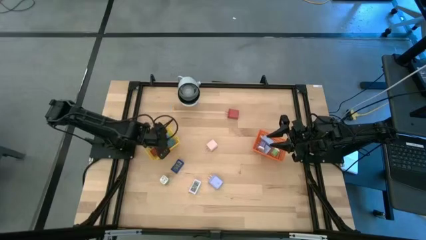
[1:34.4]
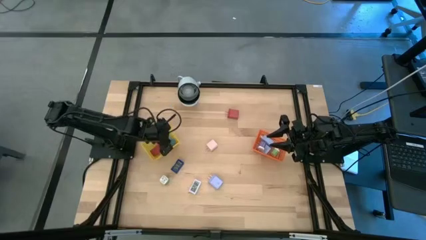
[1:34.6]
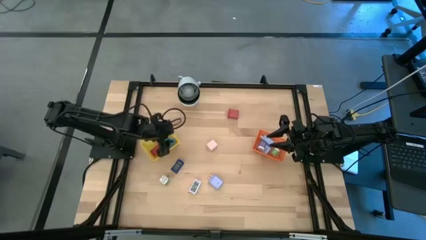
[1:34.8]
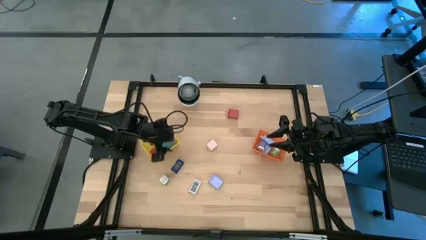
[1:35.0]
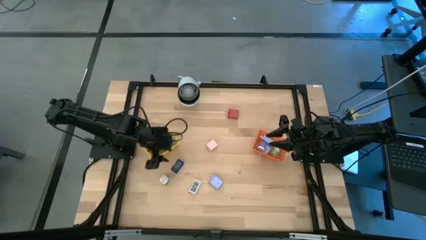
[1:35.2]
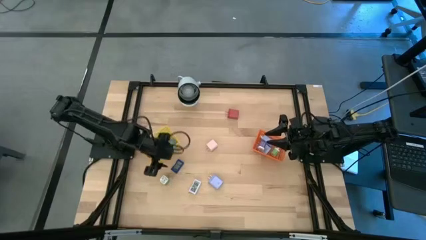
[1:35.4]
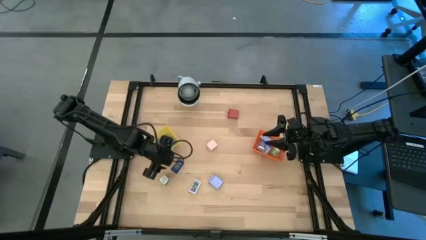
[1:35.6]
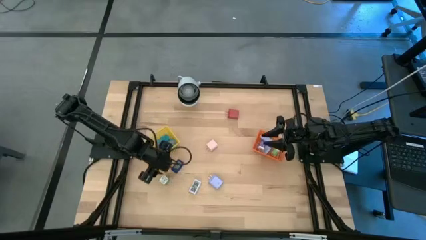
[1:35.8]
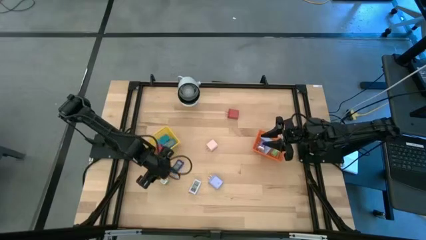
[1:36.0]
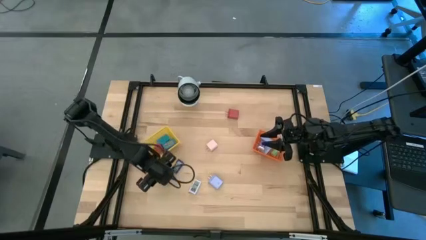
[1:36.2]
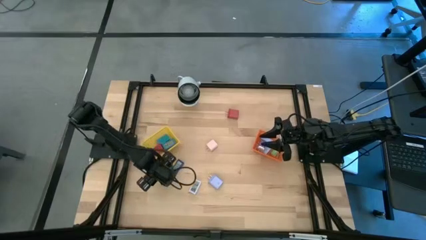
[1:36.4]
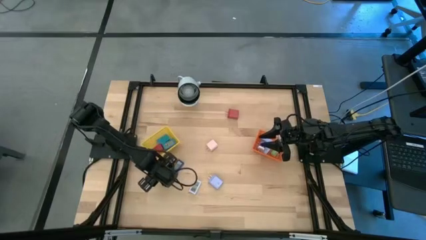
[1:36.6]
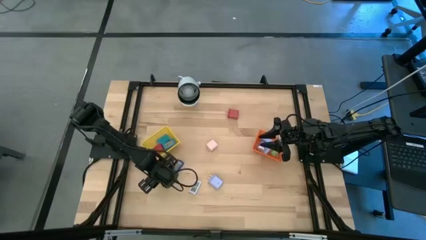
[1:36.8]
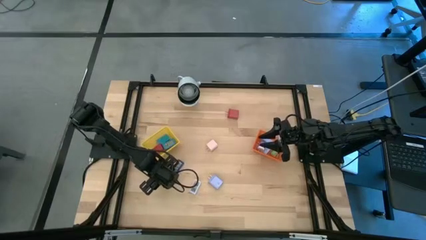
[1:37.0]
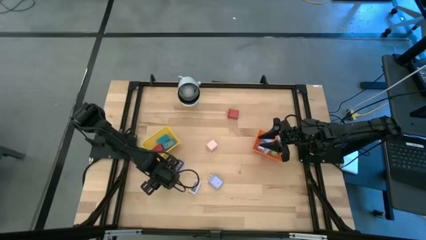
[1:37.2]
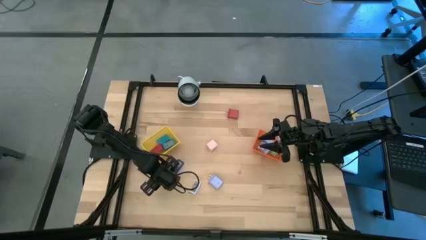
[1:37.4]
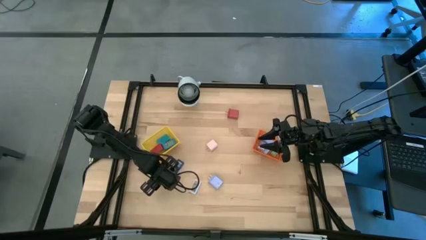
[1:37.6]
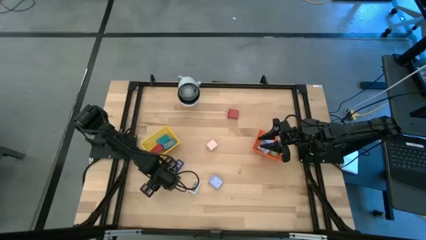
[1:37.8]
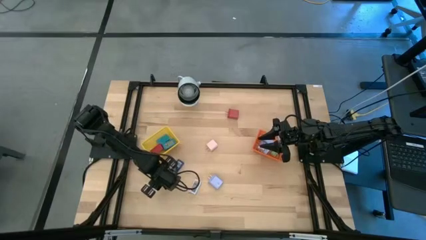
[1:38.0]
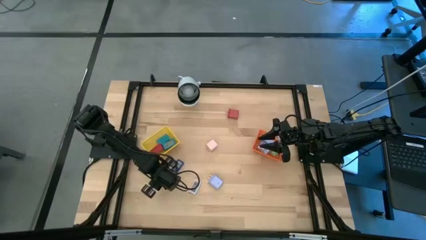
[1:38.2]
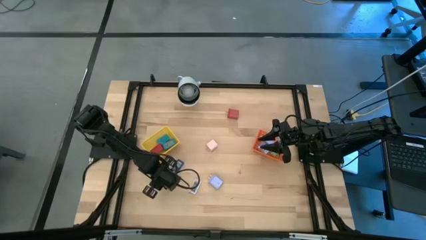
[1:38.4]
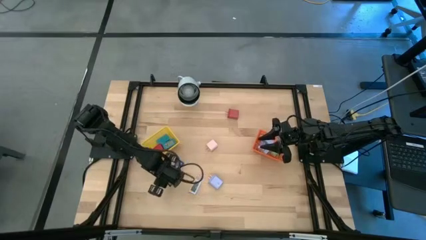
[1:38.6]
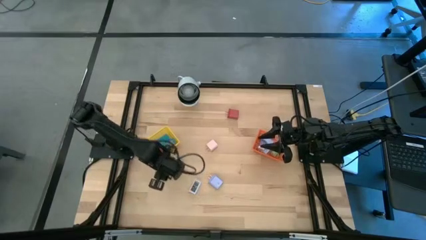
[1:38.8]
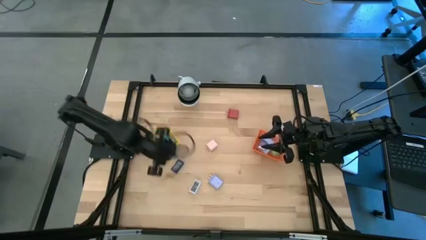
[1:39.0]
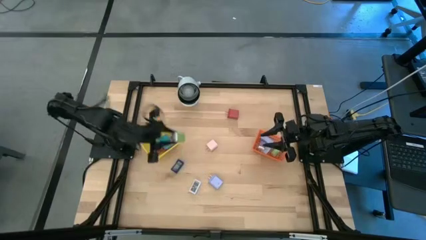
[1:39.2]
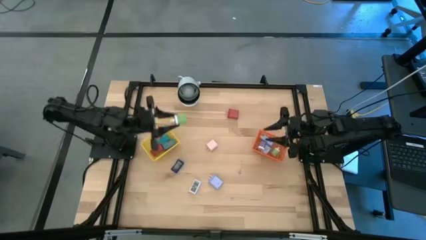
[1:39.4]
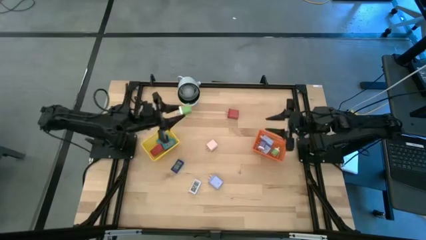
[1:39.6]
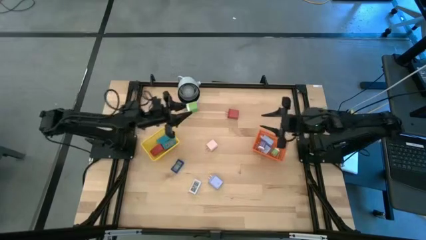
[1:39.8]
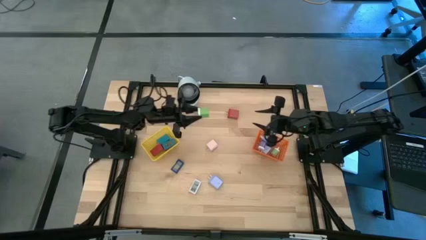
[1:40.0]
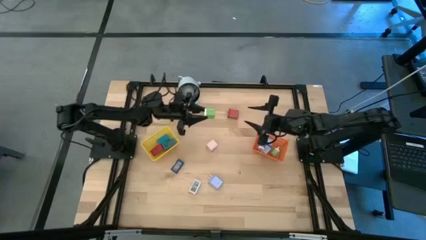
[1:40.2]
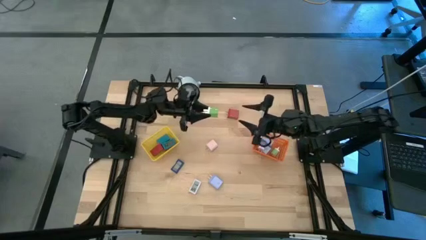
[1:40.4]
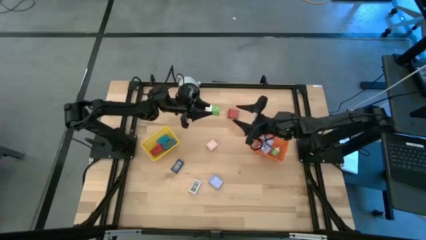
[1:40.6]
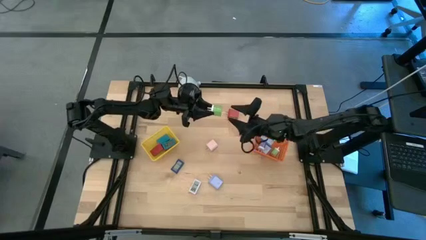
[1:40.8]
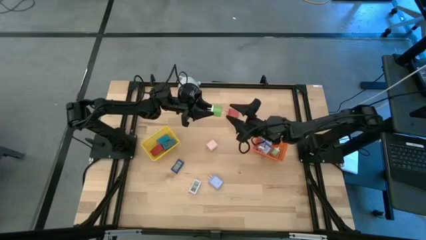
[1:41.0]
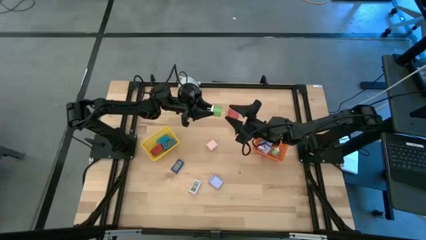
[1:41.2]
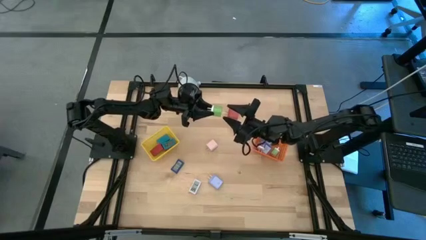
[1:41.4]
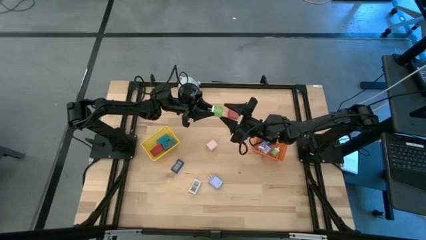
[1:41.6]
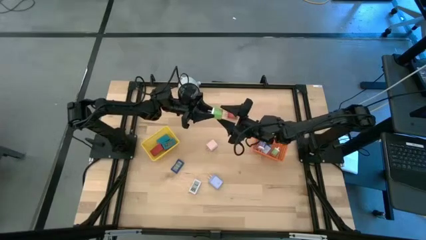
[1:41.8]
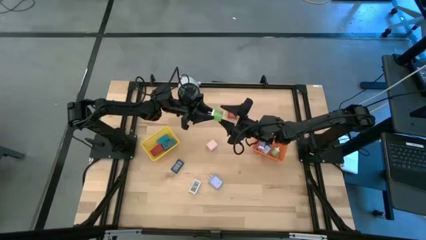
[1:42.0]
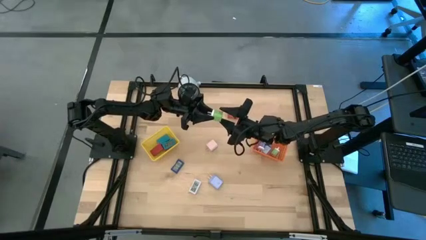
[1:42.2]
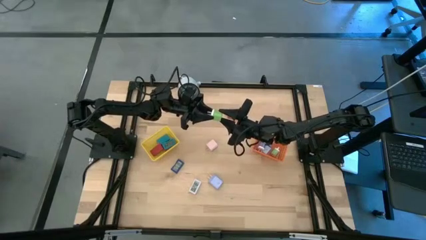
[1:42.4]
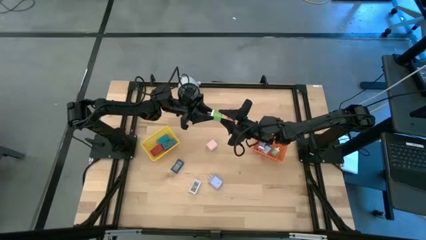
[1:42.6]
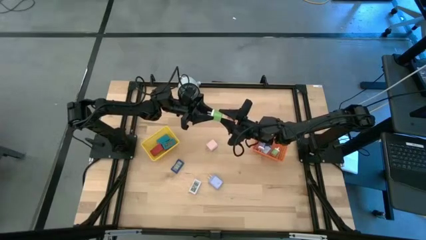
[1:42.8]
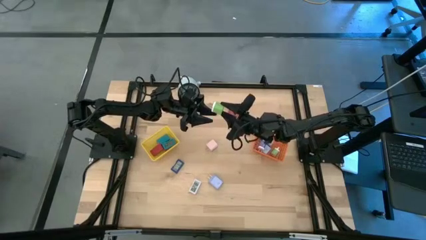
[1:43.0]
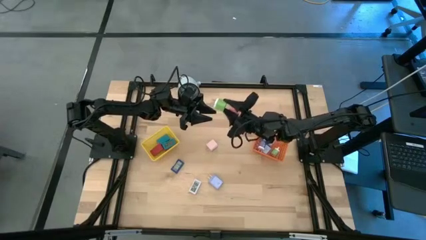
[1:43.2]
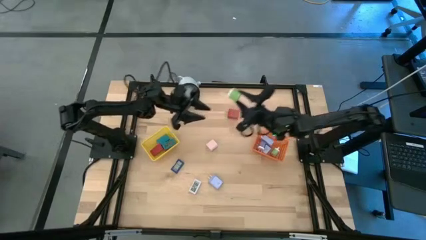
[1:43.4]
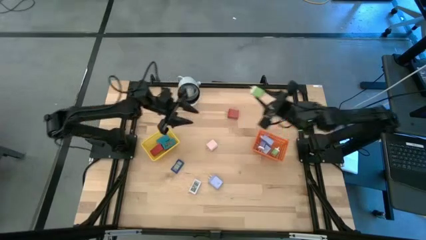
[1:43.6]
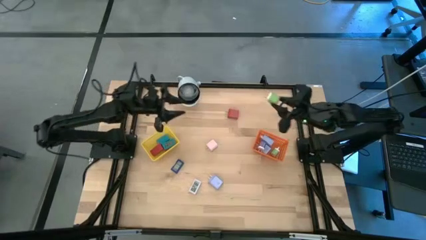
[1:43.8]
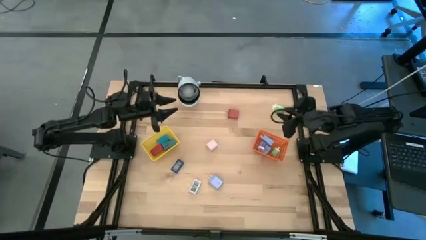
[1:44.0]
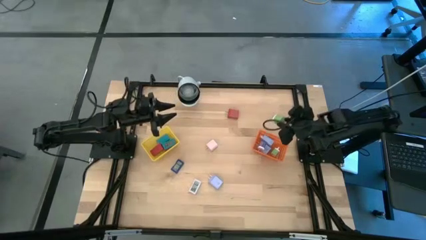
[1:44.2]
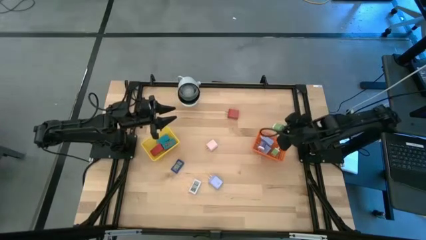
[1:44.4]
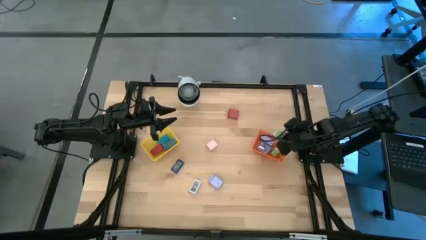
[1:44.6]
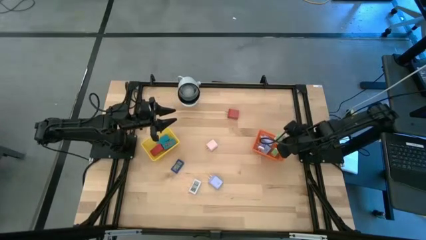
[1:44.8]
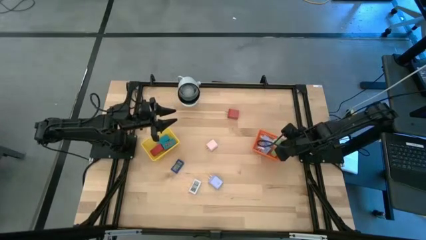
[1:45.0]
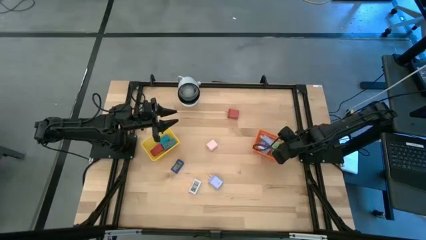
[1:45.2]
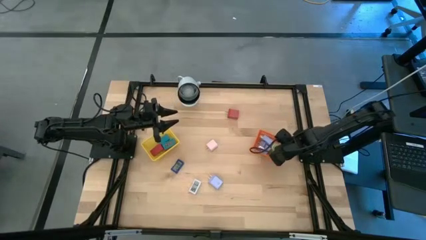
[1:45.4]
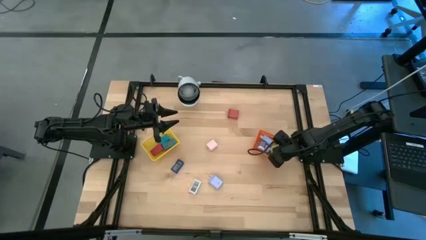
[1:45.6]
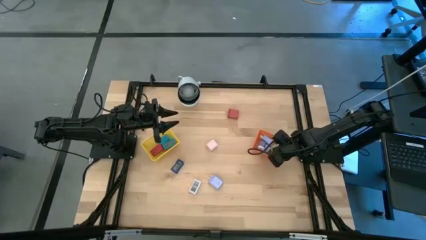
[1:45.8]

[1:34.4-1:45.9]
Task: Pick & Place Office items
Put the green charger adapter into the orange basket
